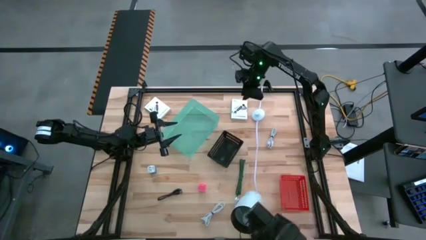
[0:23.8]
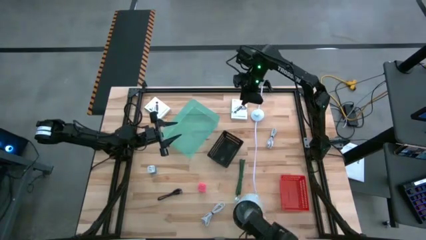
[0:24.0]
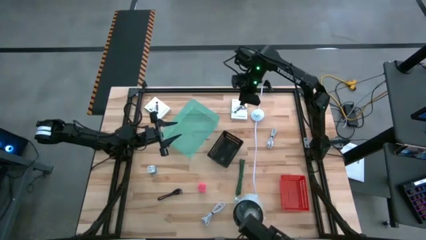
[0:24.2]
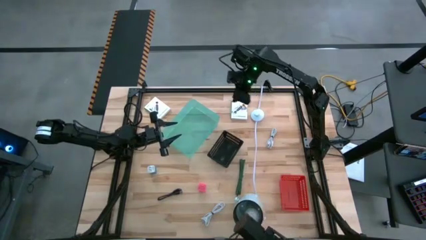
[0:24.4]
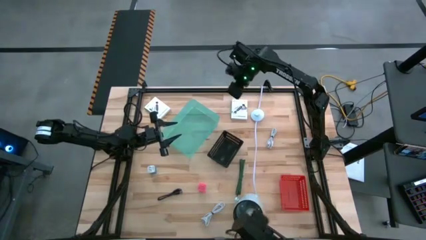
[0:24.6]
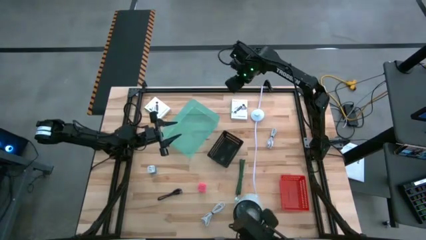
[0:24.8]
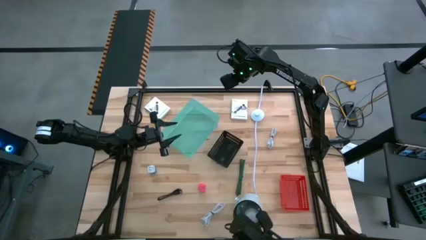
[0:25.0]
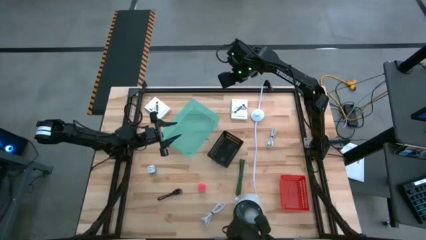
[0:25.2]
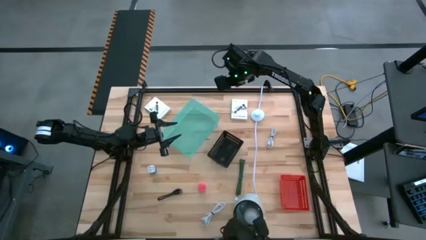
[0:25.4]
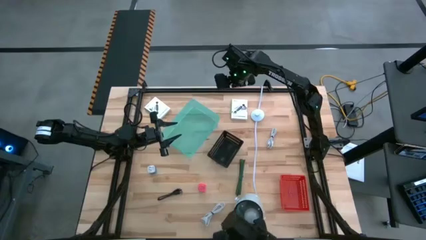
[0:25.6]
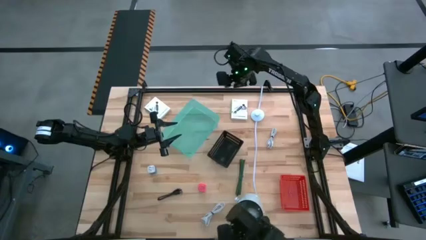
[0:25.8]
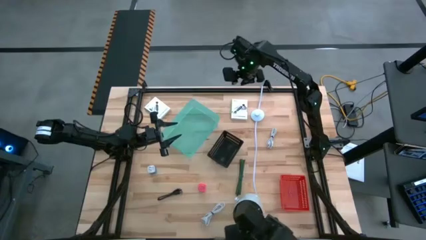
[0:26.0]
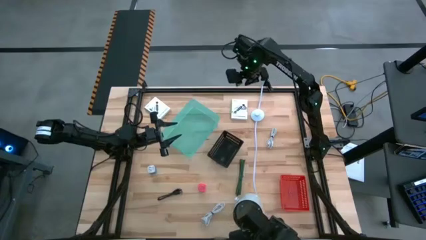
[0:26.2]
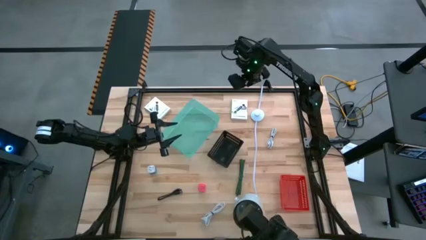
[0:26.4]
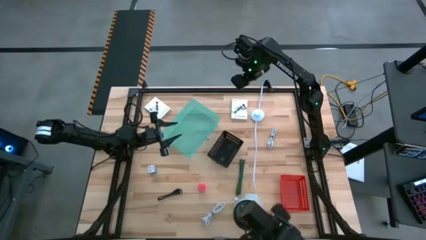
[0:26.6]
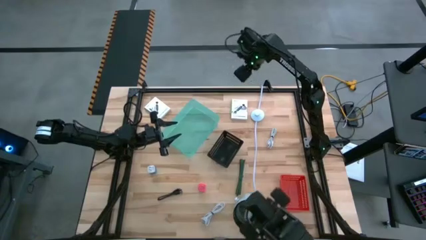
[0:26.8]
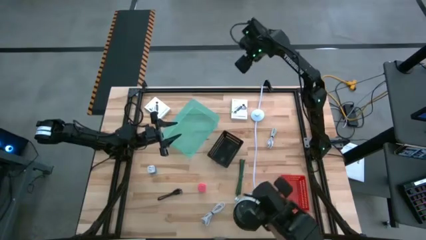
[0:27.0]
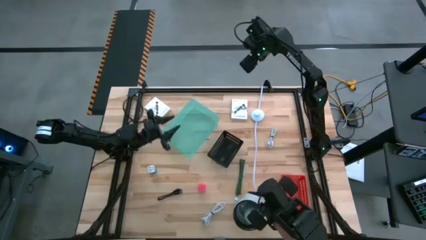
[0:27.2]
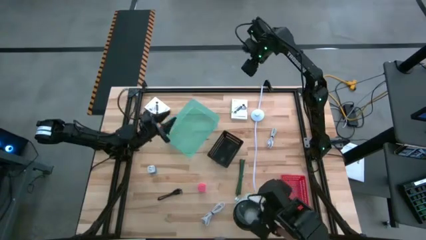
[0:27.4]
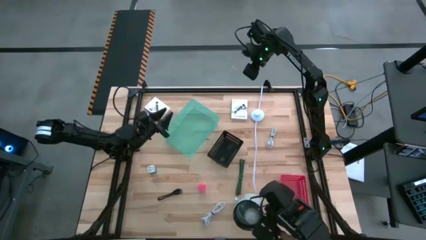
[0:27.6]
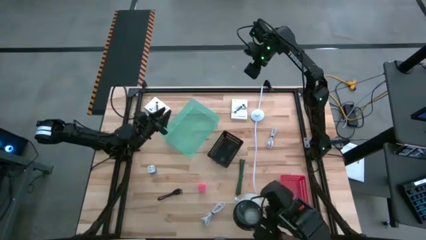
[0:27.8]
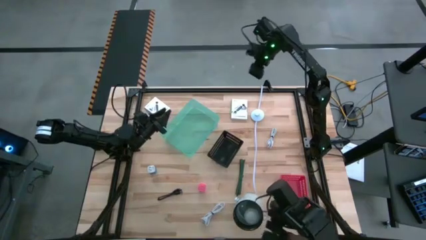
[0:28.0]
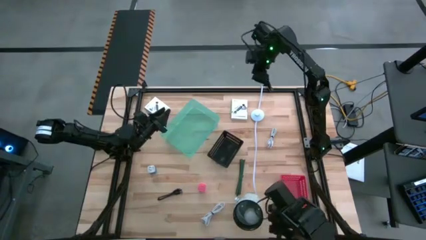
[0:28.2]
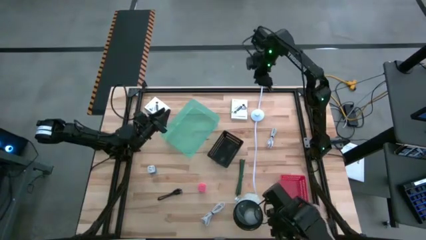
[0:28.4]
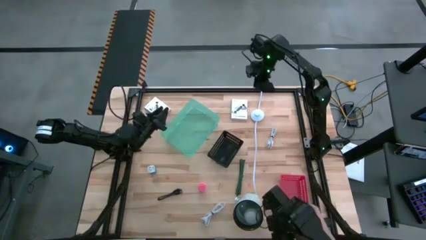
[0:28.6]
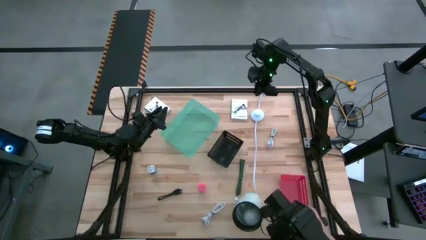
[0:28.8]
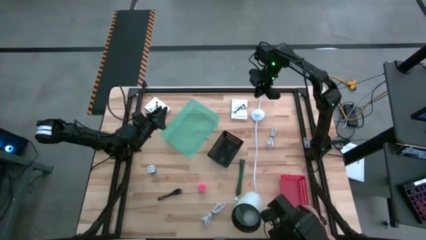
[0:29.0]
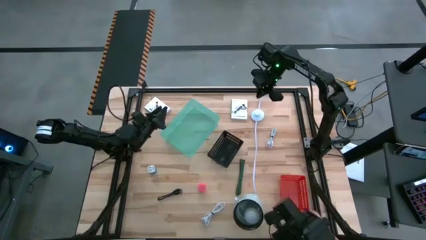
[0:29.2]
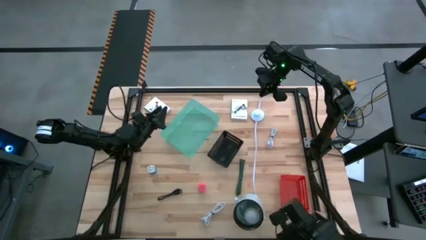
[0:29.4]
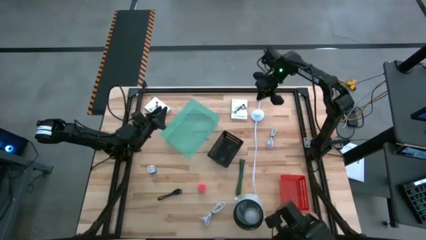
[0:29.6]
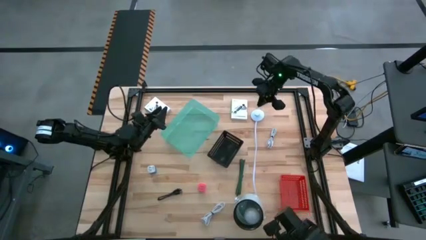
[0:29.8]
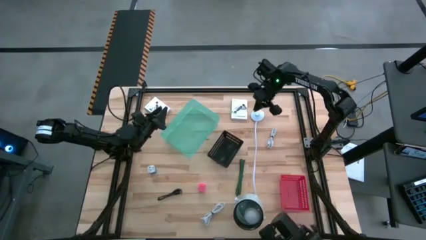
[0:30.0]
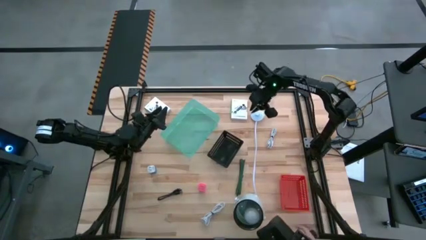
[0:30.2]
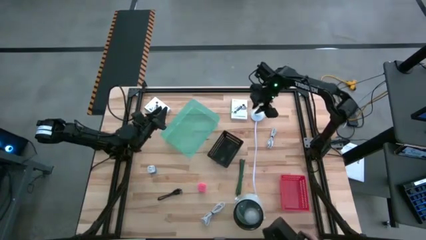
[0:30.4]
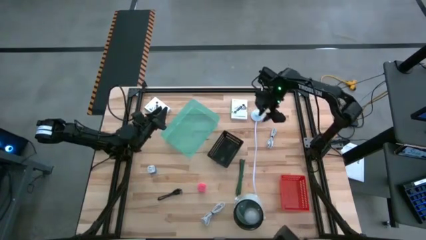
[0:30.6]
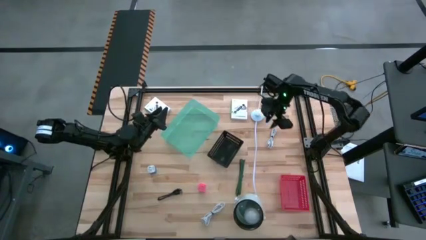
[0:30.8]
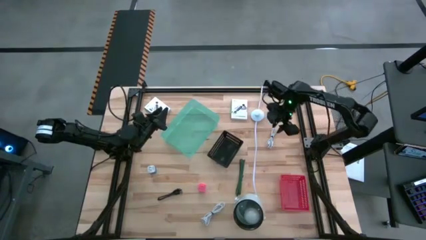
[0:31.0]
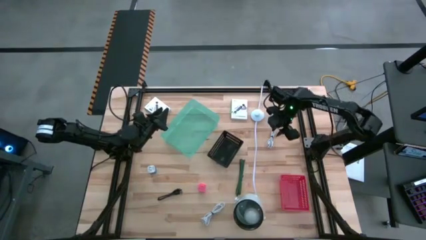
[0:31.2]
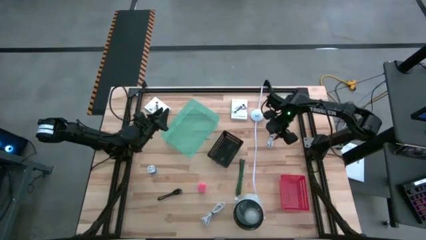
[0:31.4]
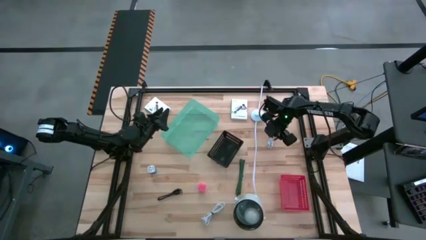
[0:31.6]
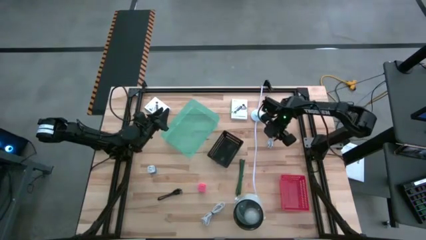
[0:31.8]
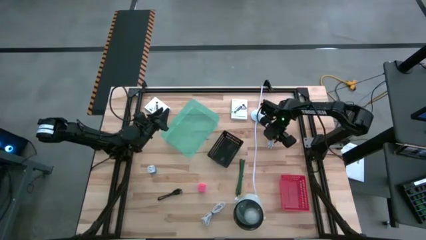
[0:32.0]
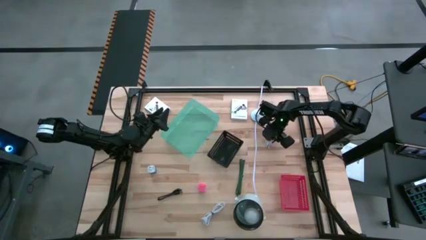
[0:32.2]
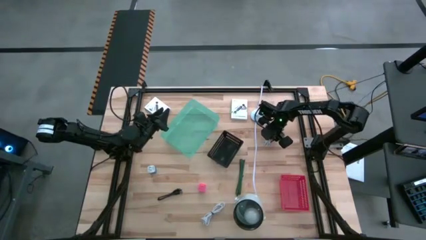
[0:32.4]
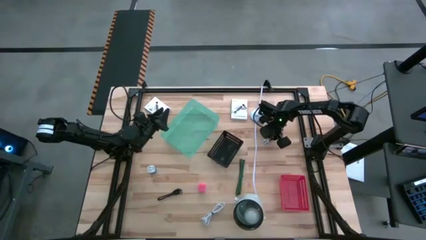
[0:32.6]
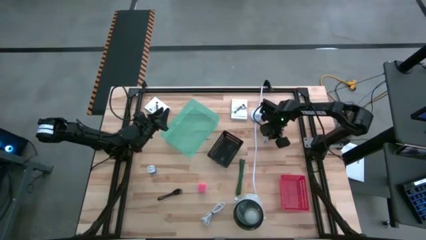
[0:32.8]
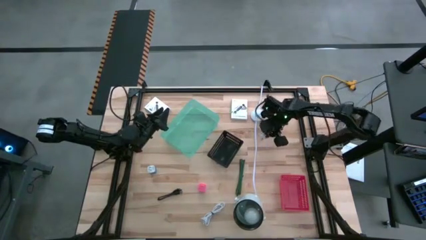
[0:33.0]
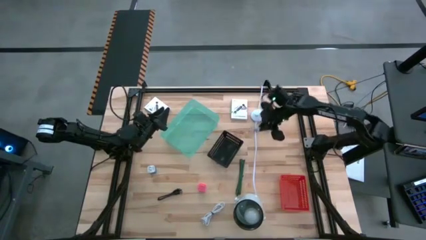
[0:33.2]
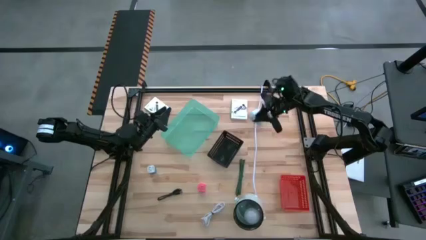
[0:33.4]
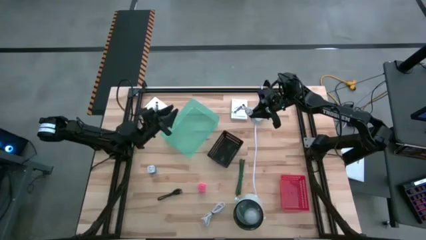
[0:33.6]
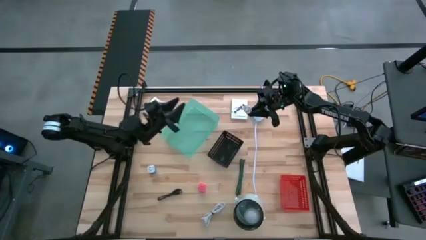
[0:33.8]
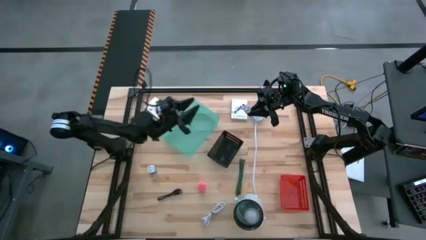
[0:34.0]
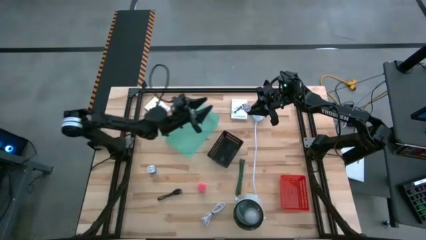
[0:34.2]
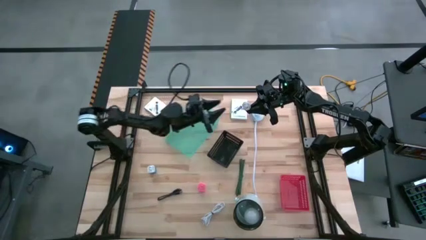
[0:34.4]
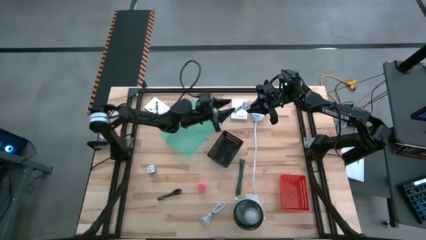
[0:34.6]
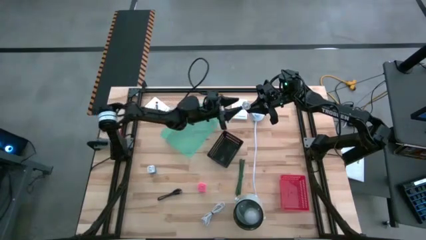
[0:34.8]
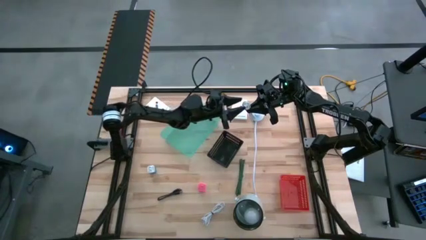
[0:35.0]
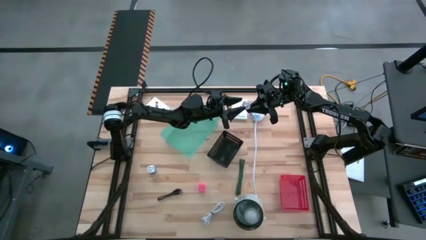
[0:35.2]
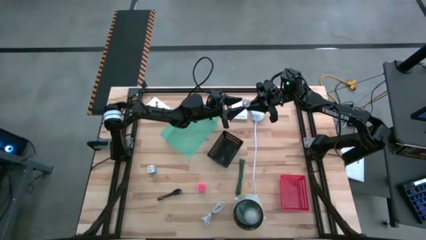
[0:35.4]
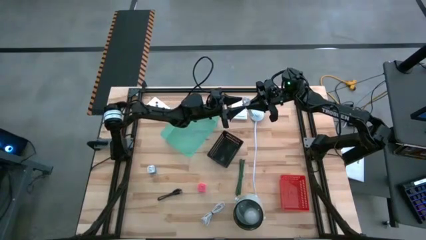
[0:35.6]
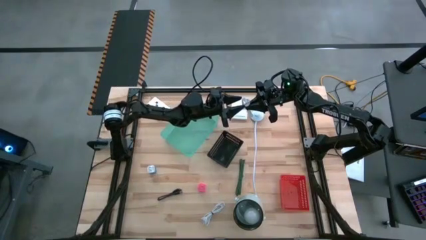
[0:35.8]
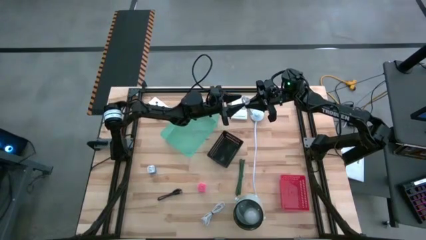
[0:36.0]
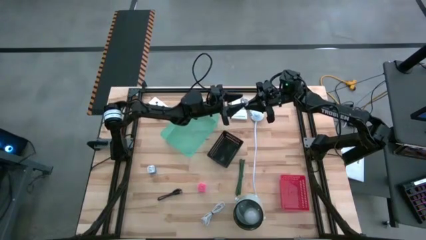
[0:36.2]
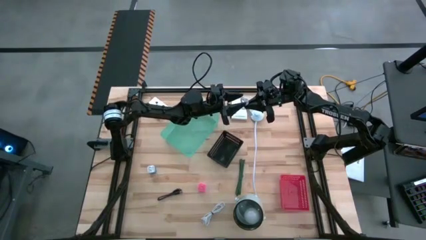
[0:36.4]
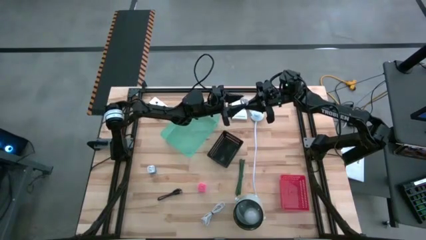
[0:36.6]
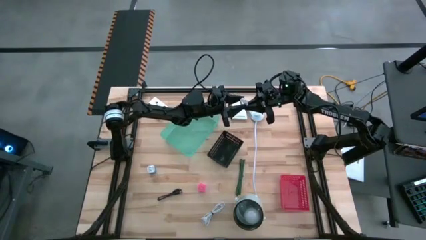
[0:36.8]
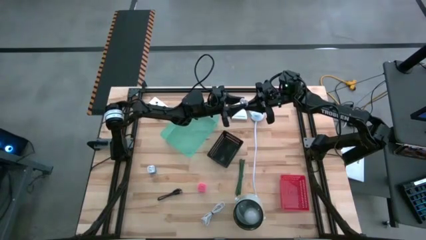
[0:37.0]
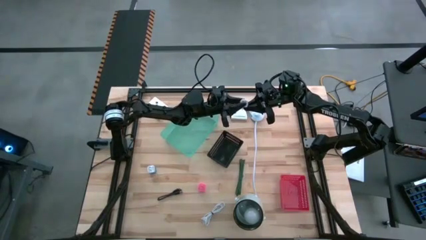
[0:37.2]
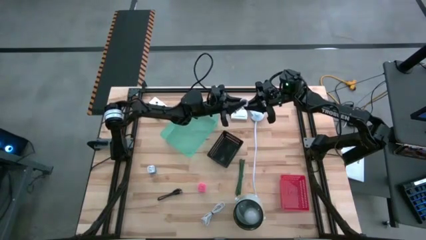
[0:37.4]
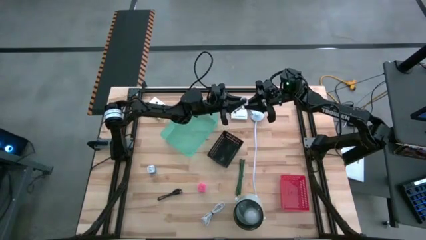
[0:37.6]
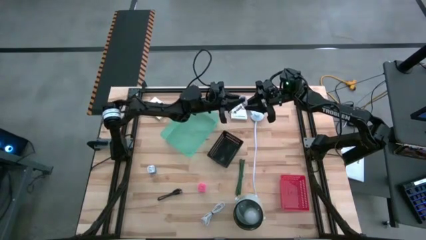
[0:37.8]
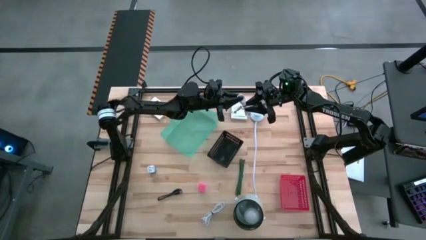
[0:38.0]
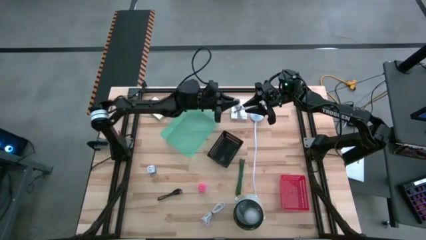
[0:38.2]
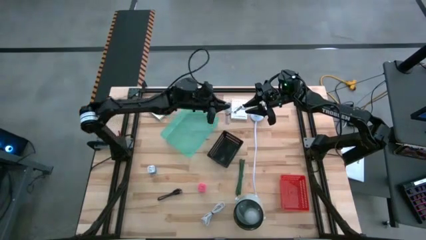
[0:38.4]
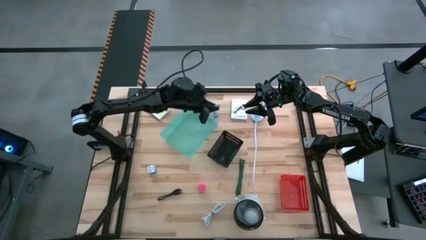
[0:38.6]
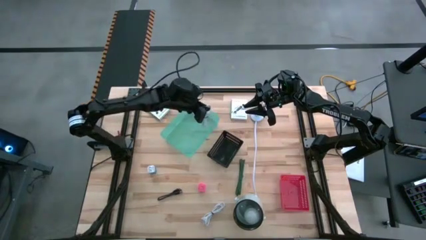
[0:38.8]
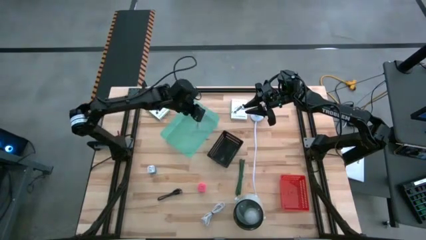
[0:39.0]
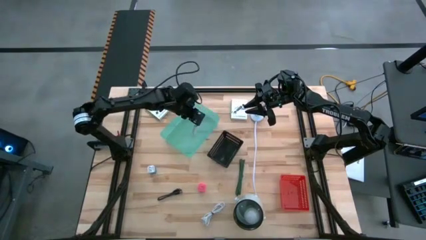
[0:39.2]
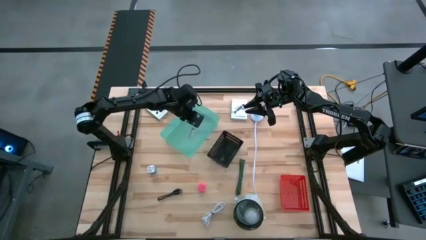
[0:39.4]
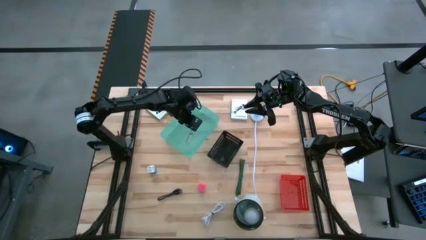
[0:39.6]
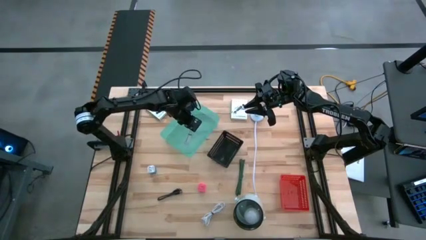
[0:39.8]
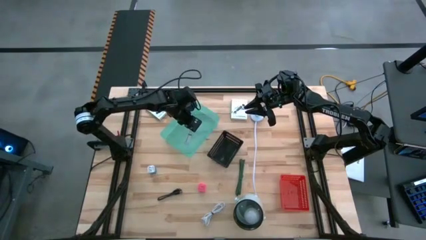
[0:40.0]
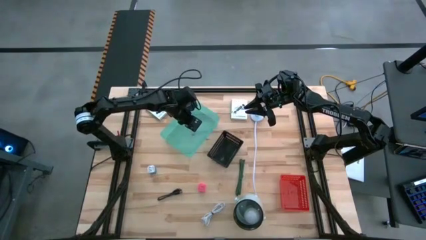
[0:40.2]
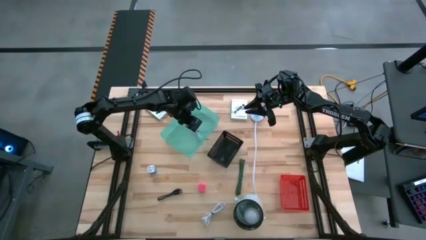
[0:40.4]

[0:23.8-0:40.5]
Task: Pick and place items into bin
Put the top white charger cable into the green bin
